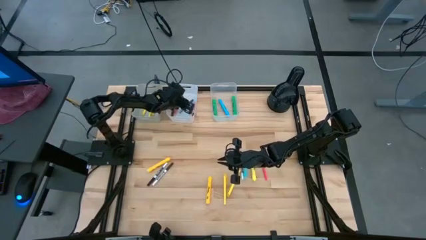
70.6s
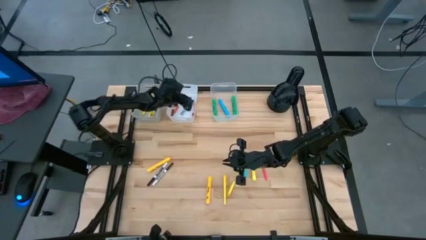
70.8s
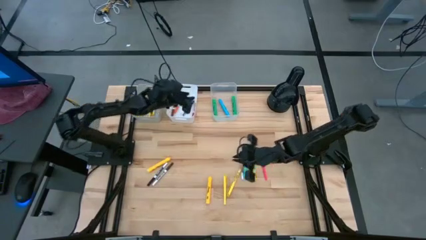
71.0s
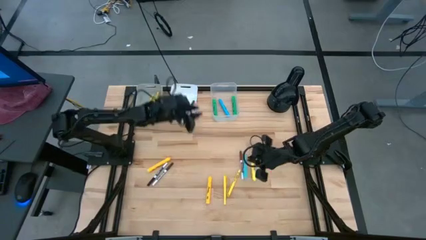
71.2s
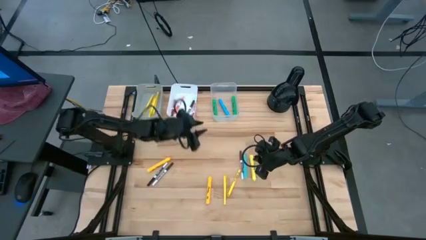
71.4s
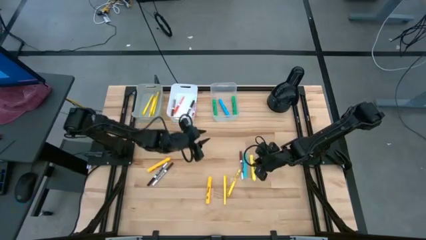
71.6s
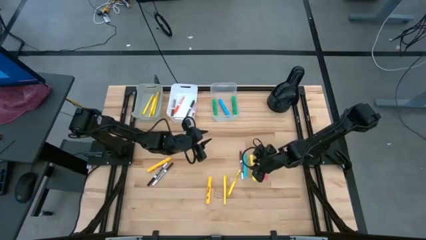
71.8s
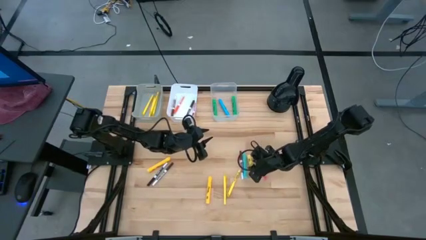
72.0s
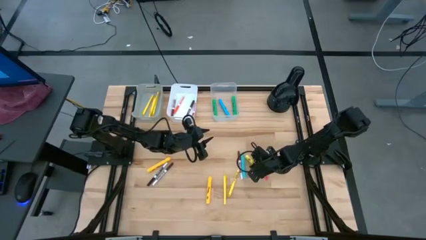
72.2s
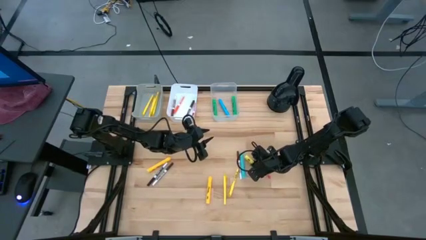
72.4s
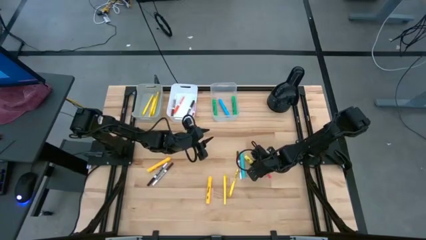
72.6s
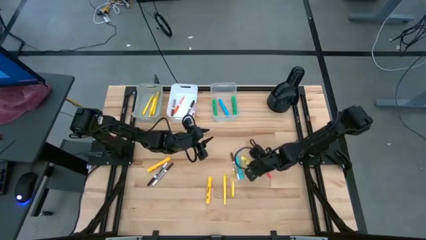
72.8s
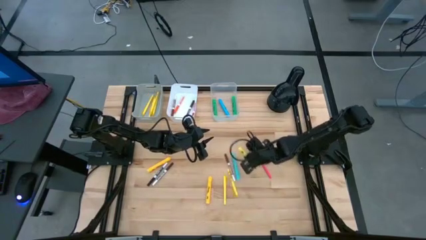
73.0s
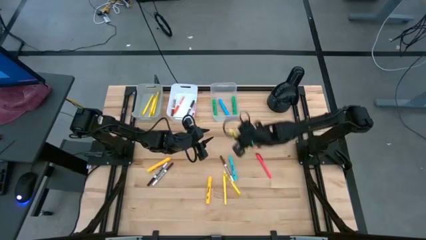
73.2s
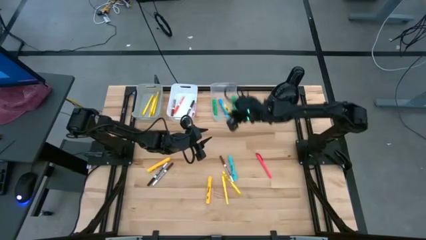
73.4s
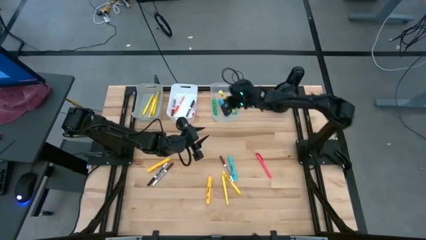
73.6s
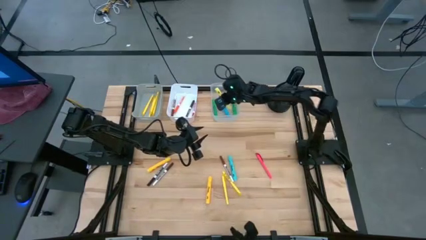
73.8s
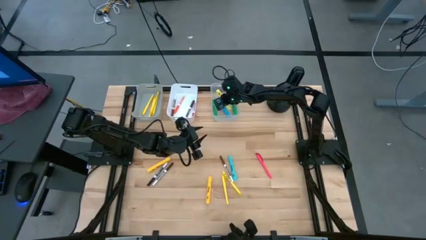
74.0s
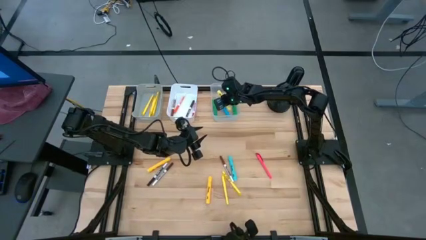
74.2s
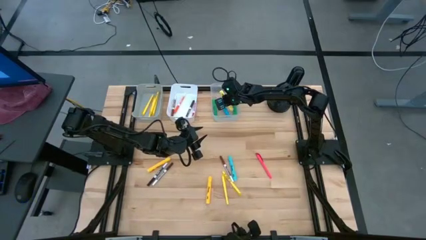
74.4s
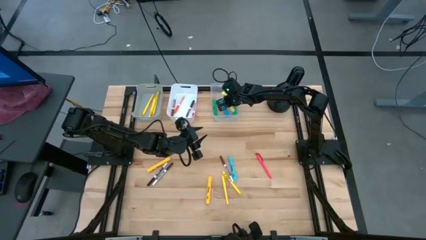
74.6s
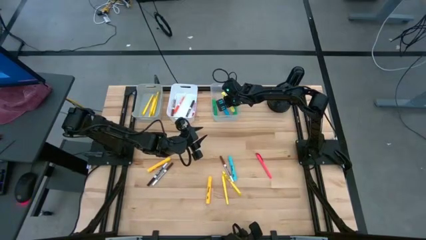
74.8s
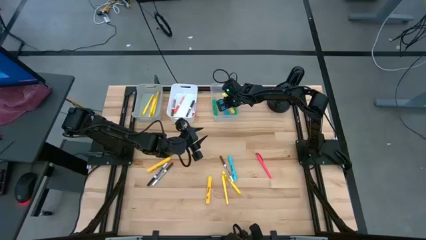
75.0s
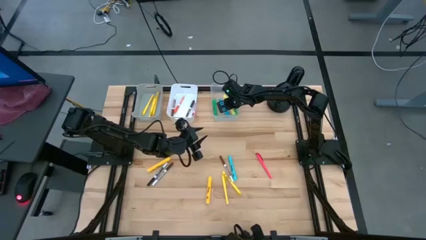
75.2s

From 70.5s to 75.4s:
Task: Pick & Place Markers
Put the yellow highlighter into the transparent bin

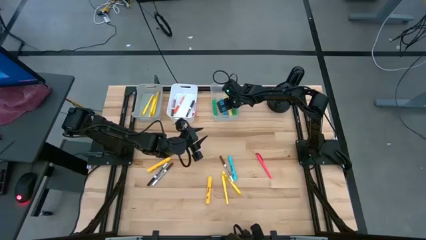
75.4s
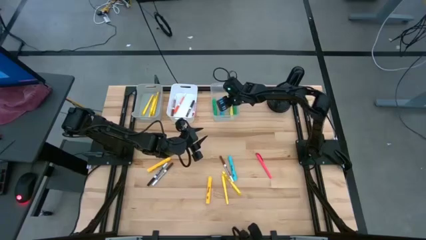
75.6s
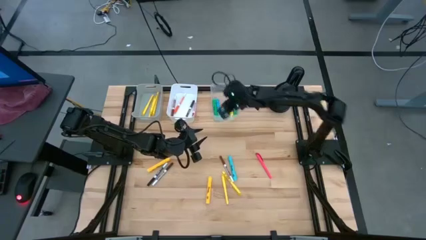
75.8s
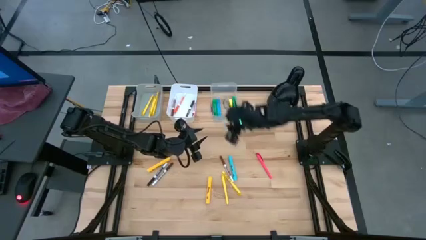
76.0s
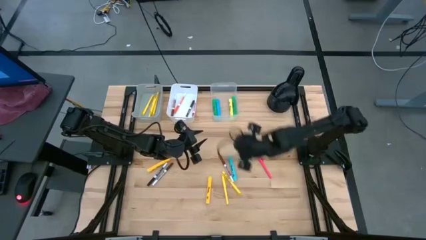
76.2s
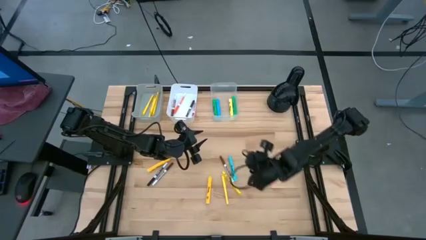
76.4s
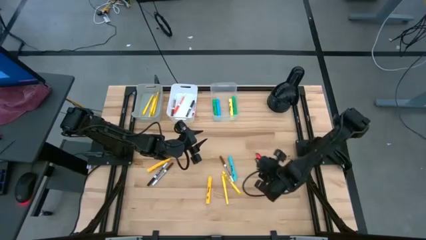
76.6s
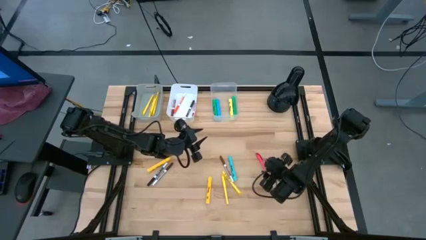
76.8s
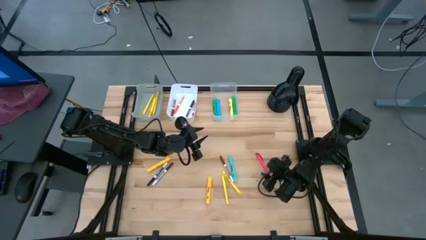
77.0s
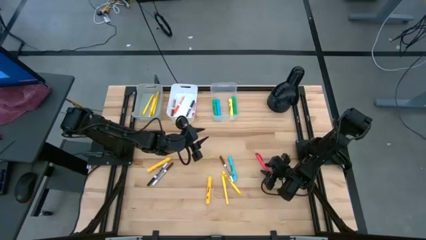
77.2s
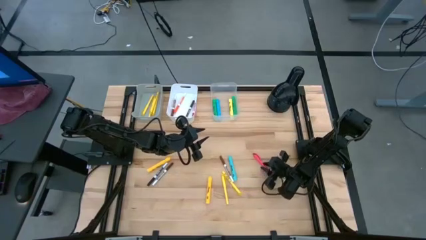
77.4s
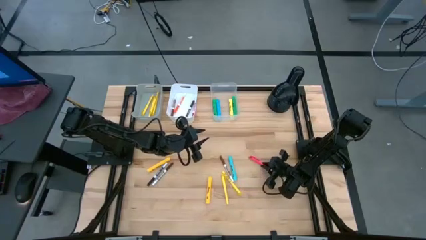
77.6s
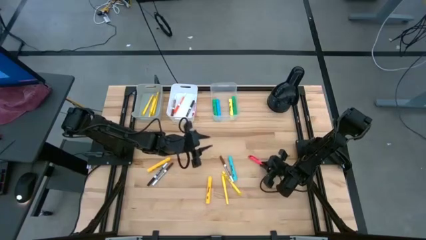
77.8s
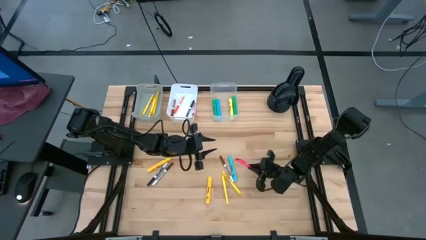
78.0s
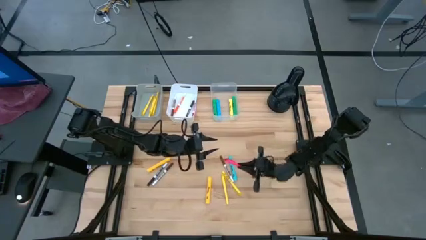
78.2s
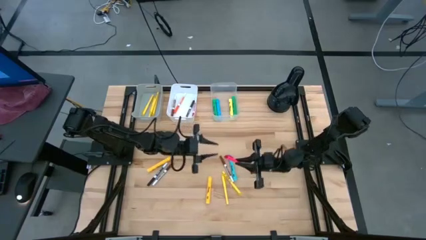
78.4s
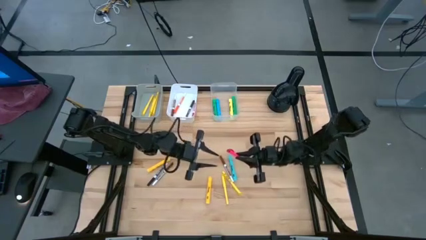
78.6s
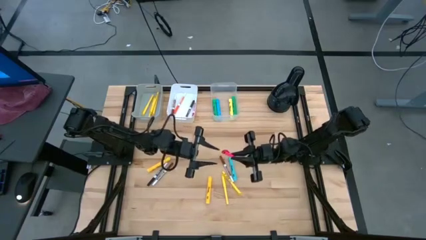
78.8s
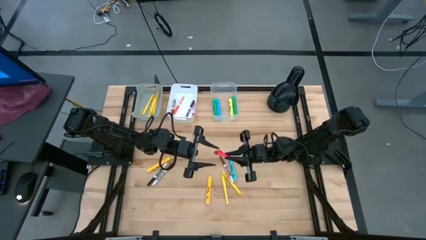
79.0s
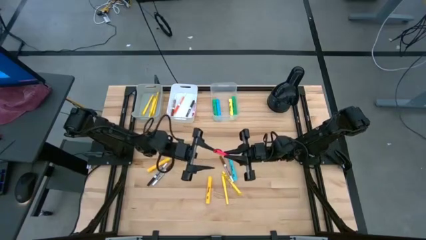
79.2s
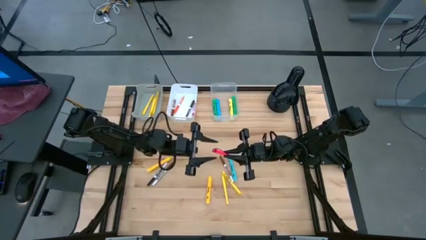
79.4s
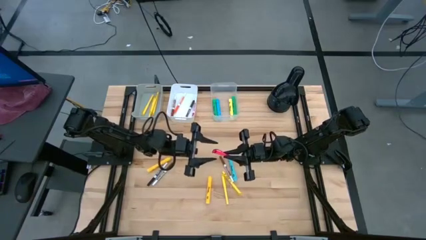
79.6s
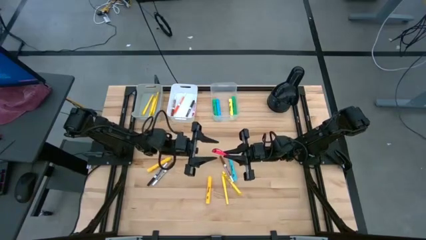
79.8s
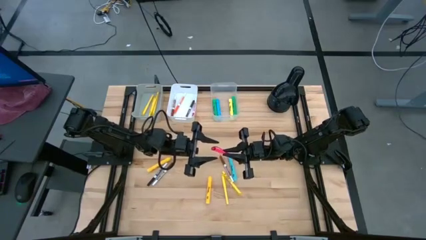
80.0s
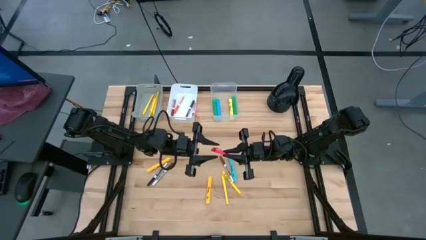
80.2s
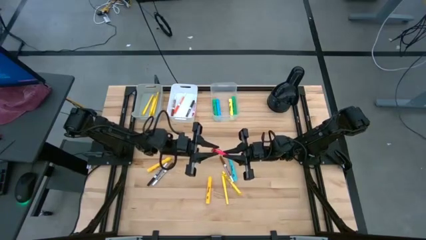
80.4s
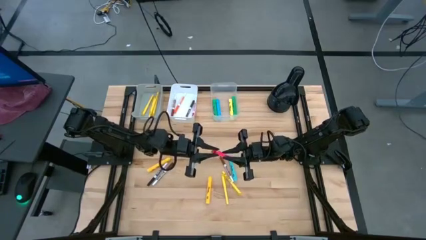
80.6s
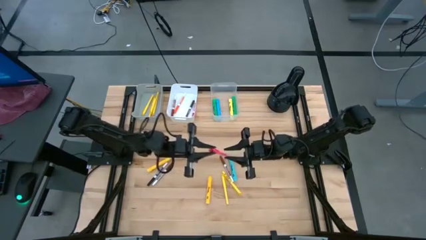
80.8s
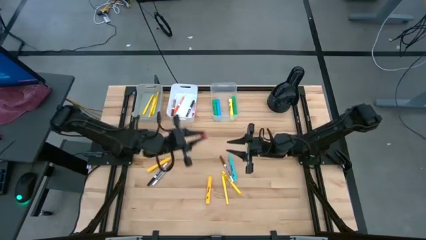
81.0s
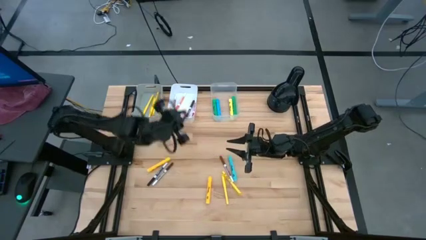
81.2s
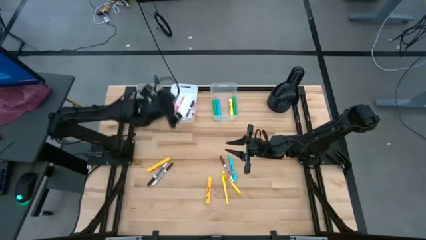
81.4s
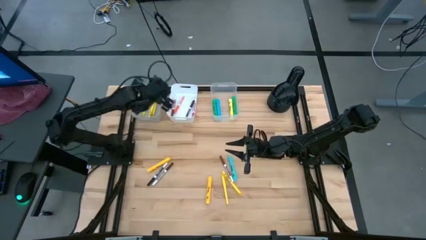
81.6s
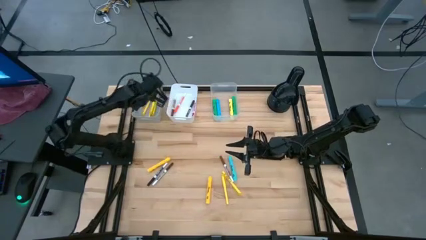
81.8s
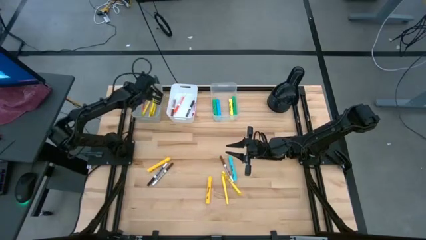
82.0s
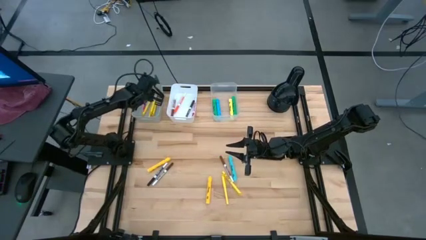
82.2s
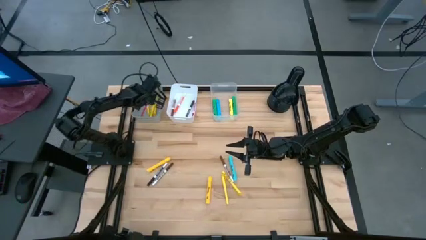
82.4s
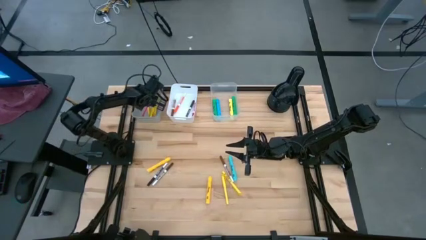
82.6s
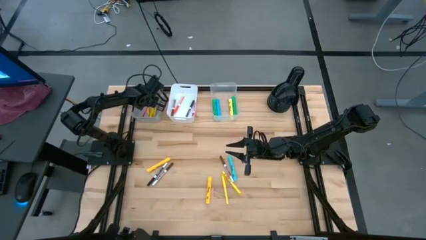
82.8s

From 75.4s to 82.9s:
Put the pink marker into the gray bin

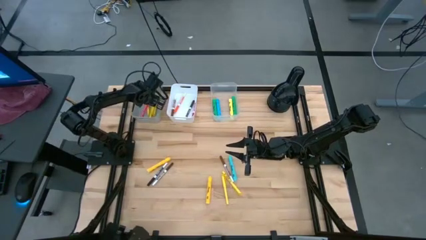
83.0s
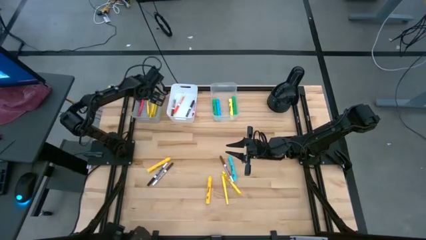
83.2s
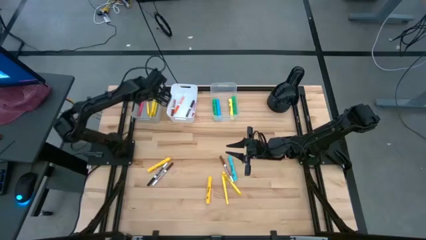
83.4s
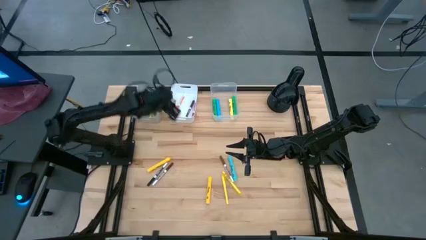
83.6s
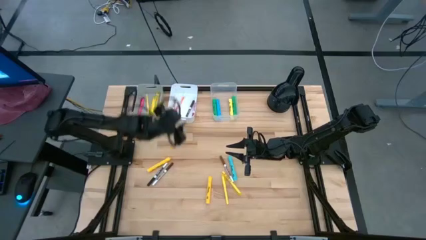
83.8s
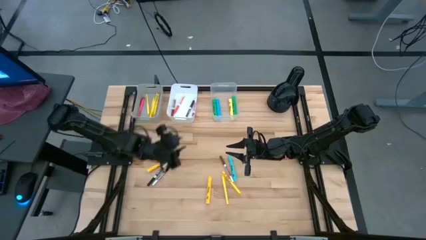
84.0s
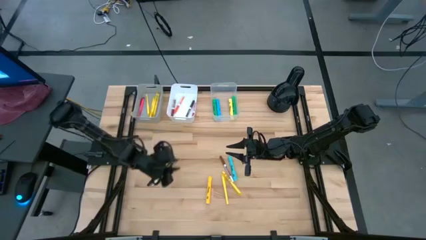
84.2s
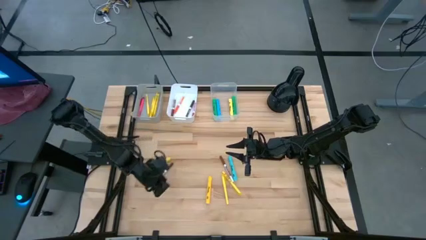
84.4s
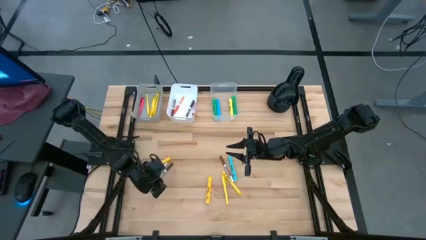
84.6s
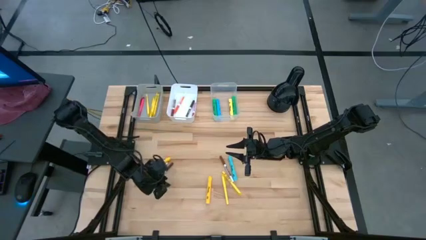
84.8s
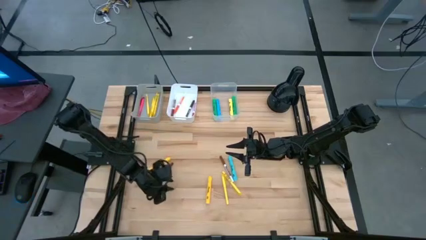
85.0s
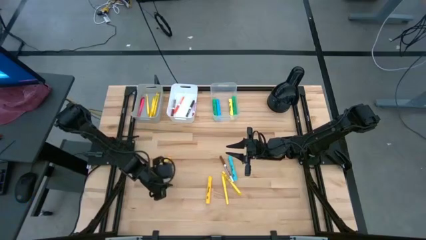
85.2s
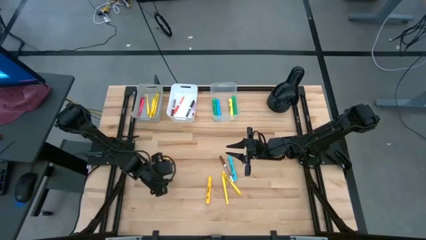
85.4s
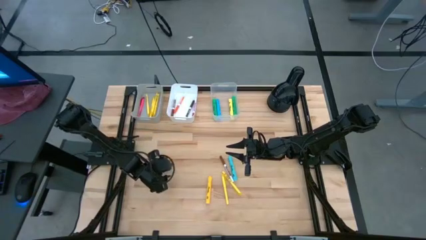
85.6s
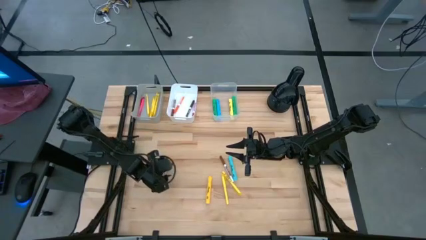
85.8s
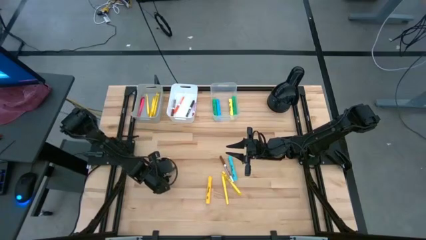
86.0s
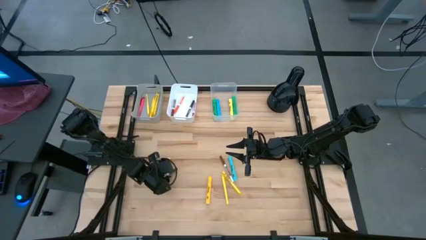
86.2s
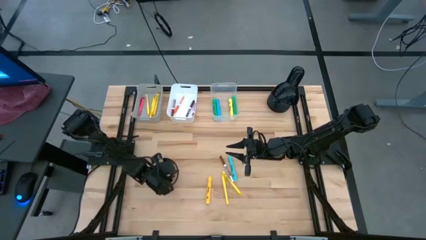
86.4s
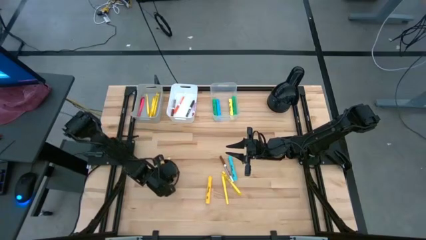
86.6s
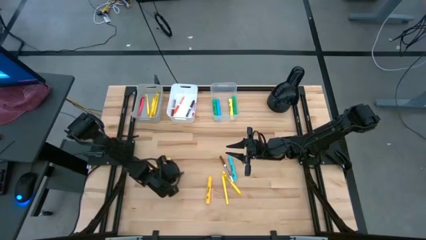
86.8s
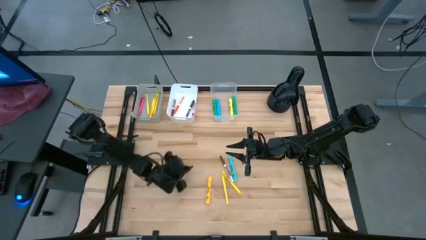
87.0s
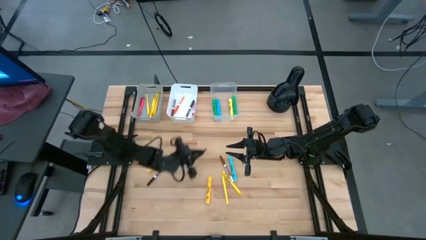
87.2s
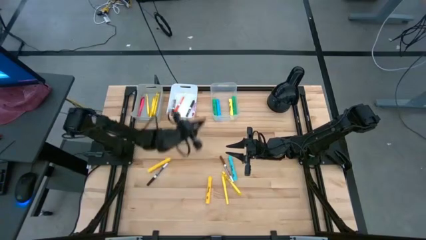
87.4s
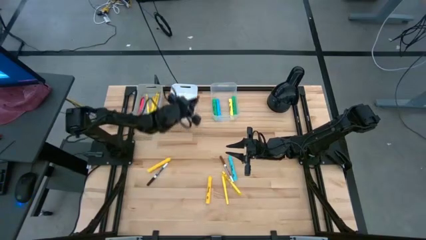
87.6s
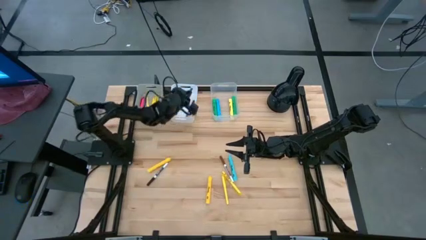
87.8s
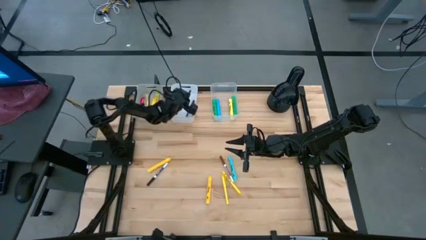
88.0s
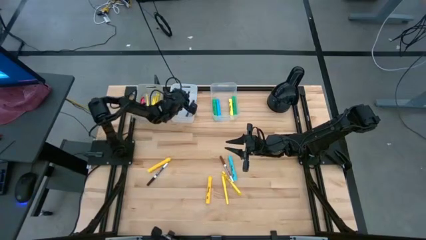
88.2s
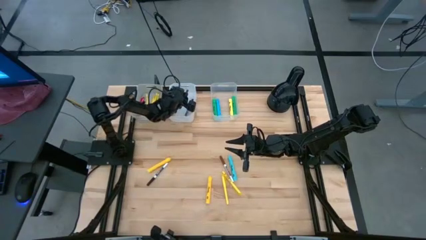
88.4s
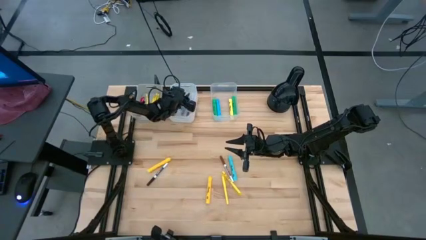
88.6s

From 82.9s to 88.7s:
Put the brown erase marker into the white bin
